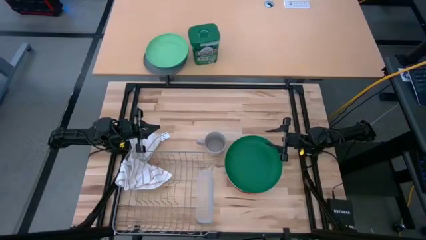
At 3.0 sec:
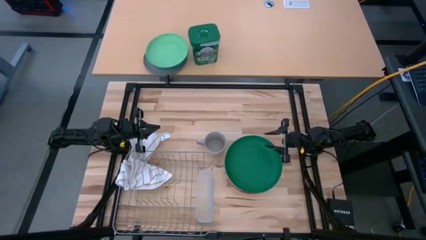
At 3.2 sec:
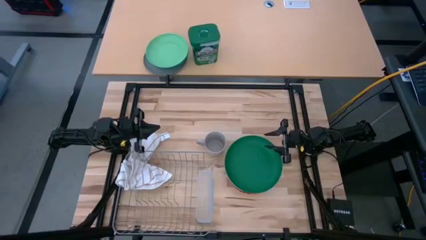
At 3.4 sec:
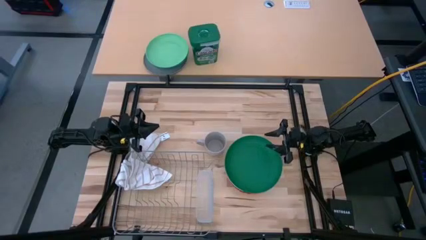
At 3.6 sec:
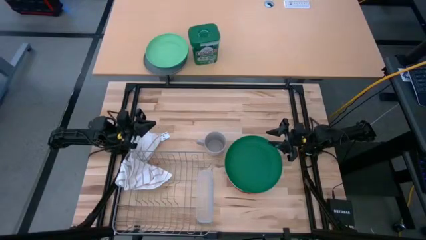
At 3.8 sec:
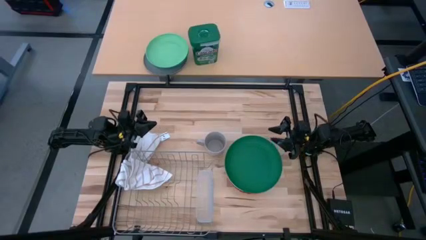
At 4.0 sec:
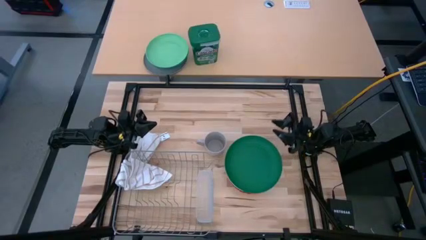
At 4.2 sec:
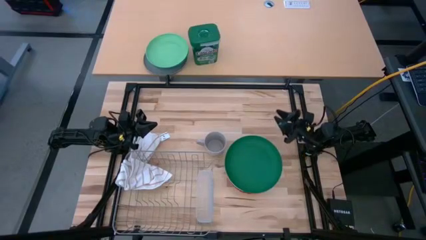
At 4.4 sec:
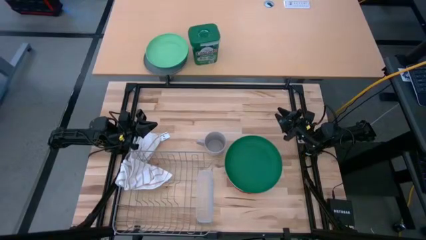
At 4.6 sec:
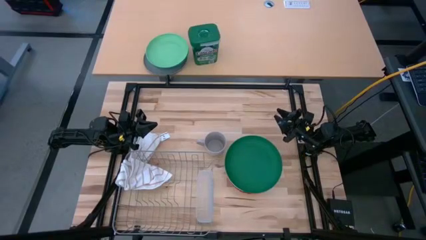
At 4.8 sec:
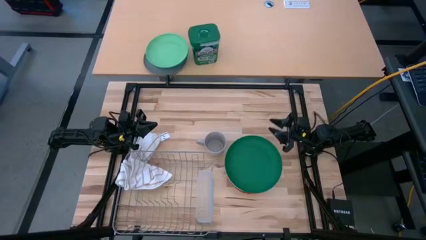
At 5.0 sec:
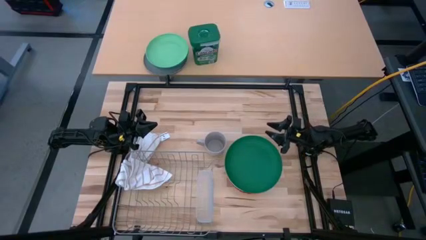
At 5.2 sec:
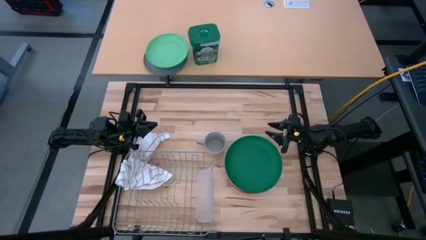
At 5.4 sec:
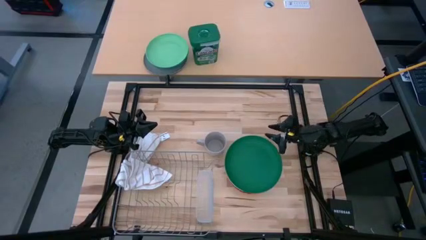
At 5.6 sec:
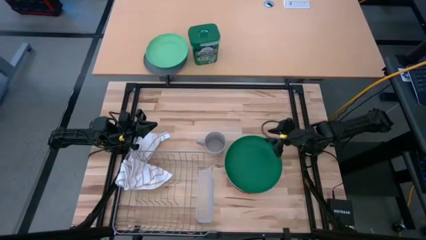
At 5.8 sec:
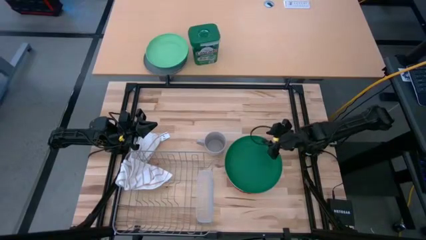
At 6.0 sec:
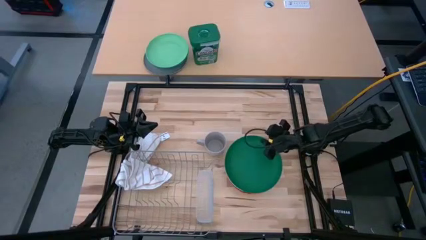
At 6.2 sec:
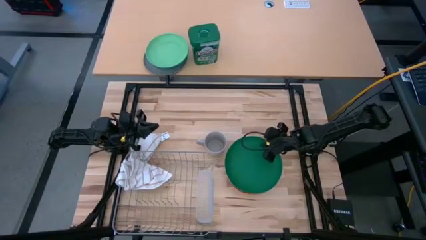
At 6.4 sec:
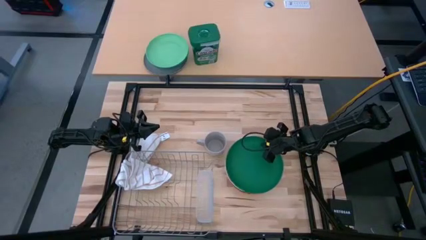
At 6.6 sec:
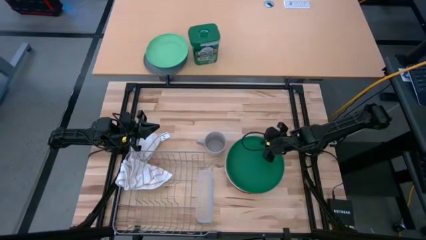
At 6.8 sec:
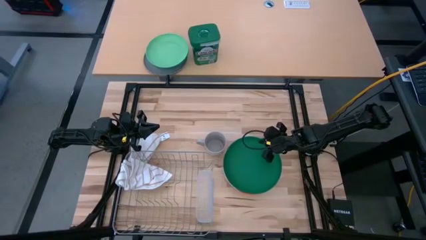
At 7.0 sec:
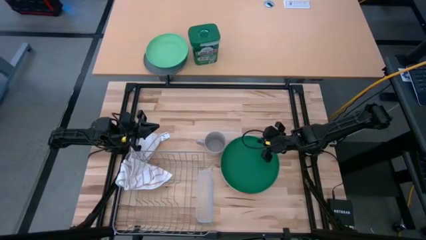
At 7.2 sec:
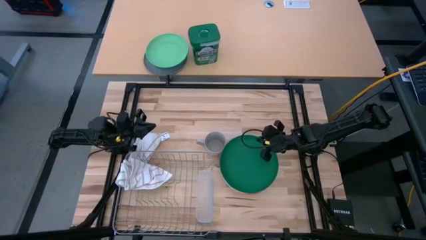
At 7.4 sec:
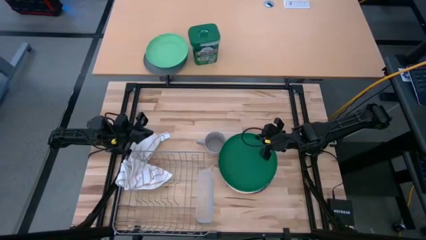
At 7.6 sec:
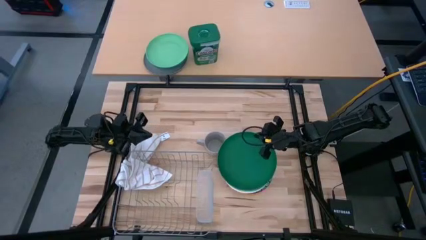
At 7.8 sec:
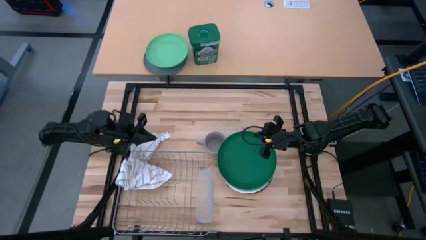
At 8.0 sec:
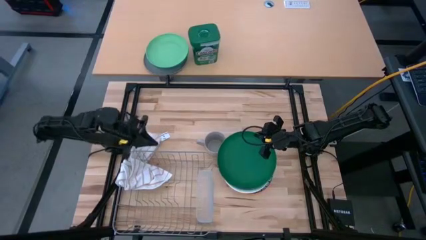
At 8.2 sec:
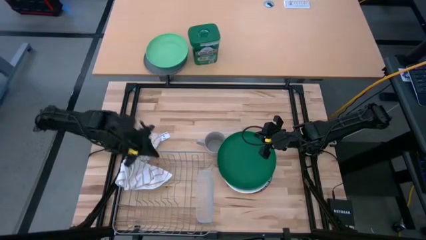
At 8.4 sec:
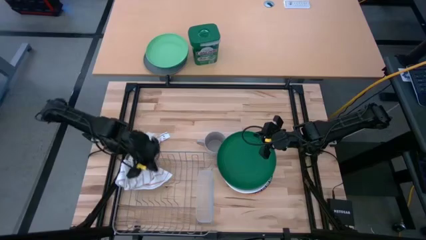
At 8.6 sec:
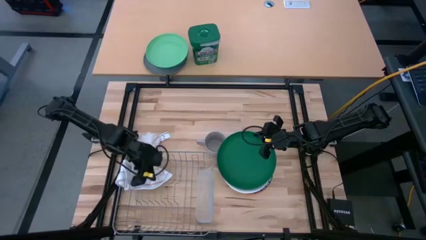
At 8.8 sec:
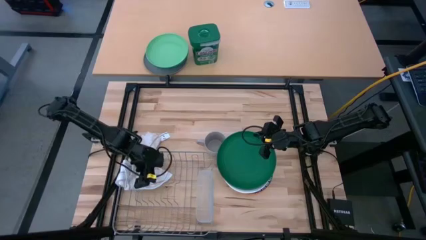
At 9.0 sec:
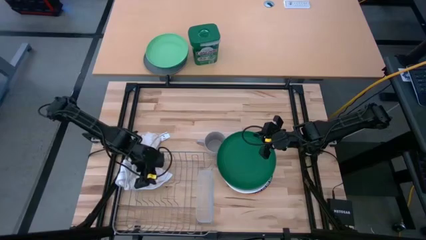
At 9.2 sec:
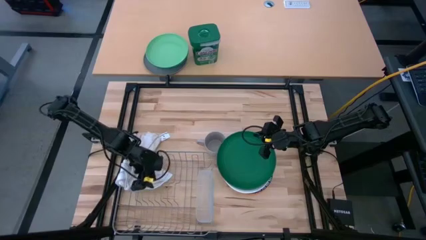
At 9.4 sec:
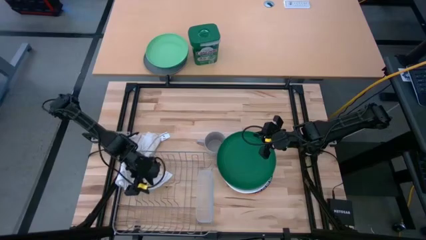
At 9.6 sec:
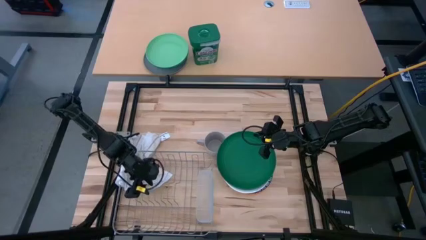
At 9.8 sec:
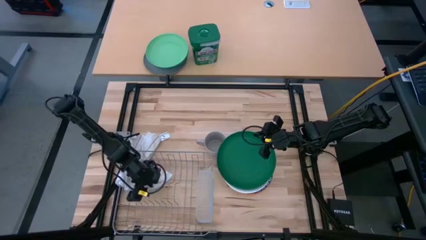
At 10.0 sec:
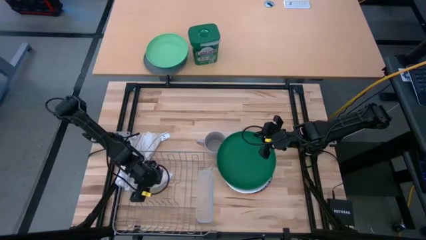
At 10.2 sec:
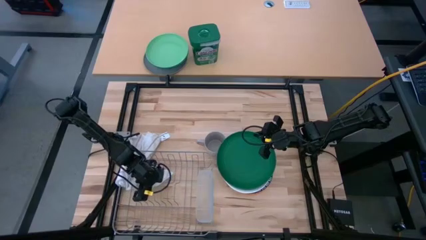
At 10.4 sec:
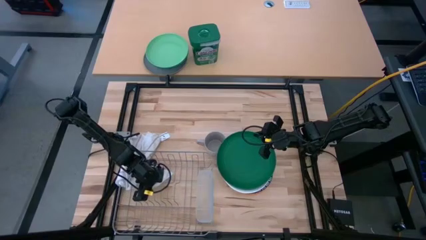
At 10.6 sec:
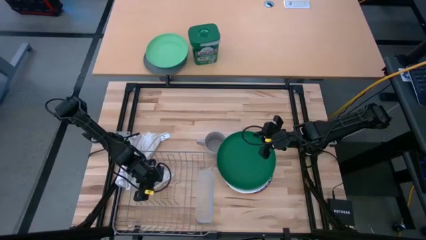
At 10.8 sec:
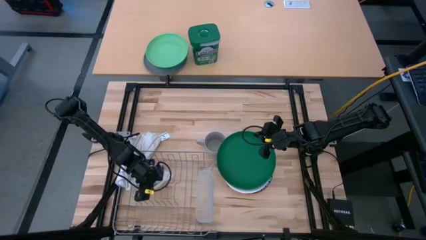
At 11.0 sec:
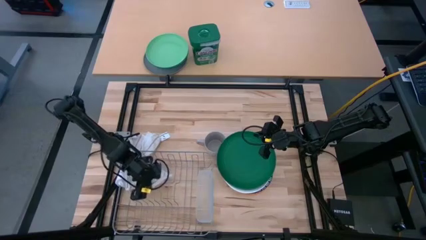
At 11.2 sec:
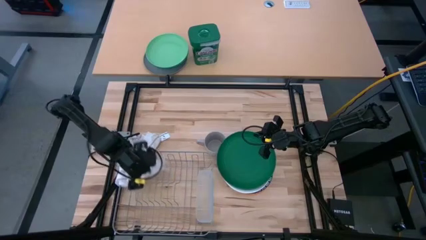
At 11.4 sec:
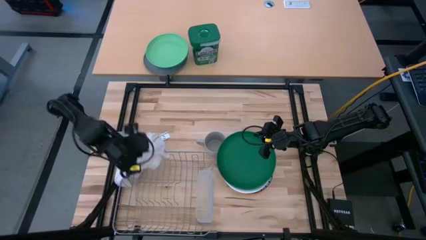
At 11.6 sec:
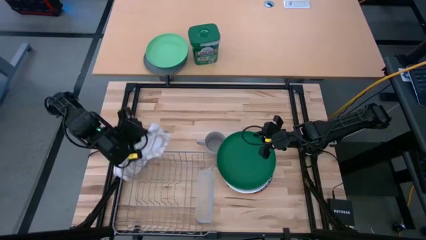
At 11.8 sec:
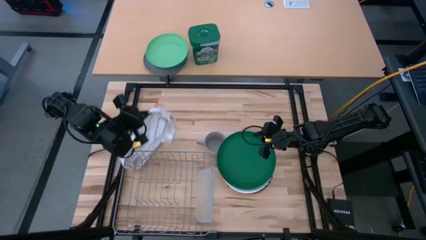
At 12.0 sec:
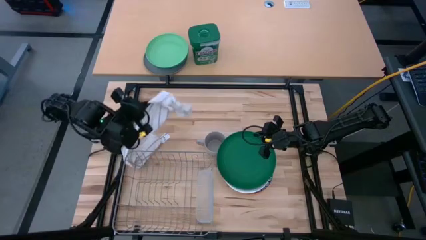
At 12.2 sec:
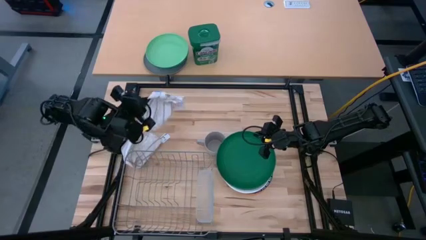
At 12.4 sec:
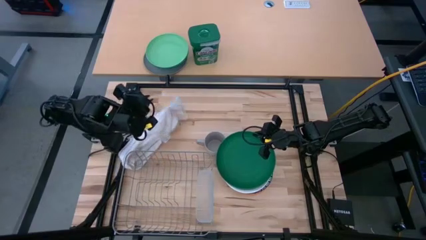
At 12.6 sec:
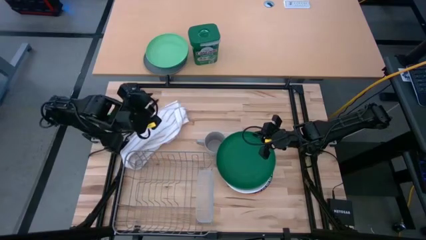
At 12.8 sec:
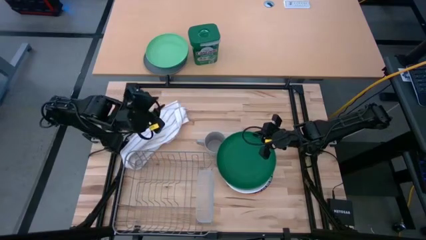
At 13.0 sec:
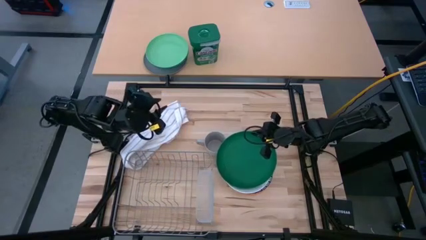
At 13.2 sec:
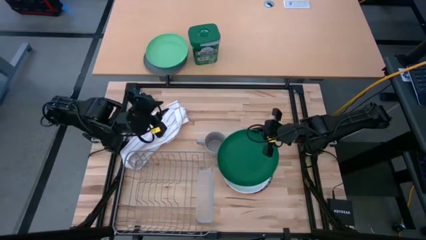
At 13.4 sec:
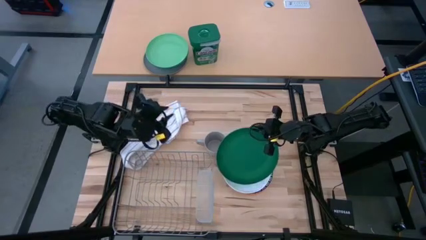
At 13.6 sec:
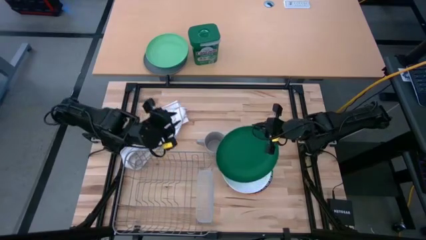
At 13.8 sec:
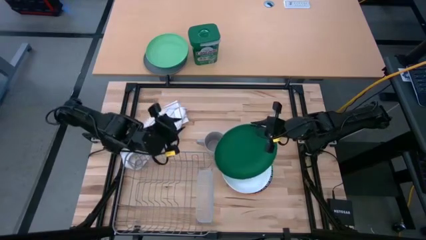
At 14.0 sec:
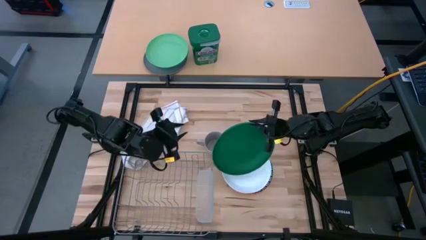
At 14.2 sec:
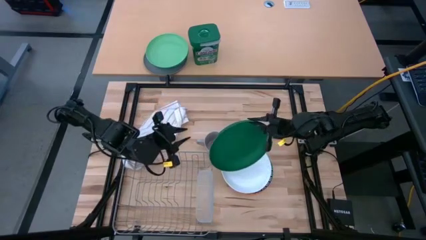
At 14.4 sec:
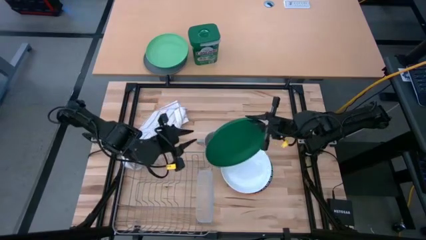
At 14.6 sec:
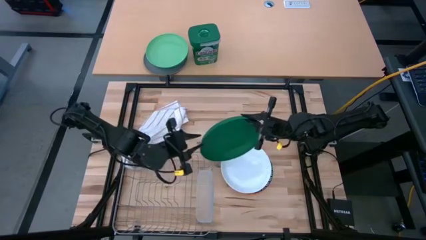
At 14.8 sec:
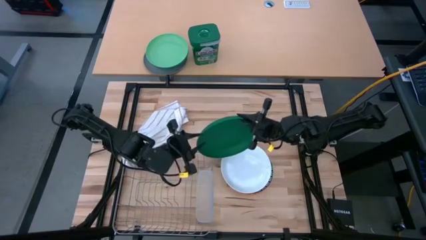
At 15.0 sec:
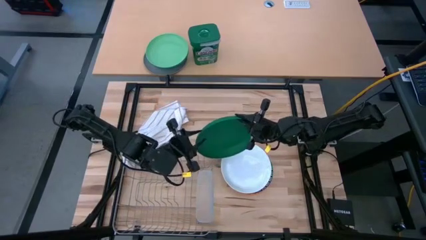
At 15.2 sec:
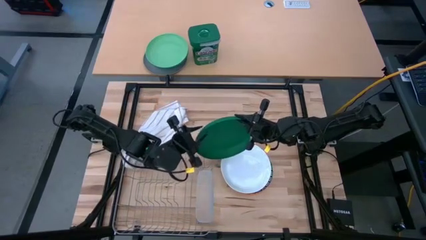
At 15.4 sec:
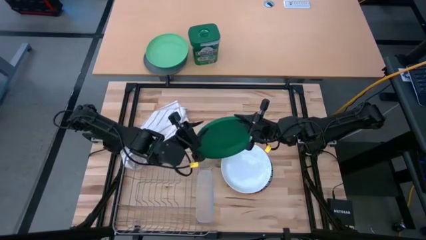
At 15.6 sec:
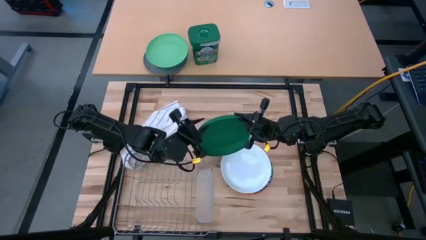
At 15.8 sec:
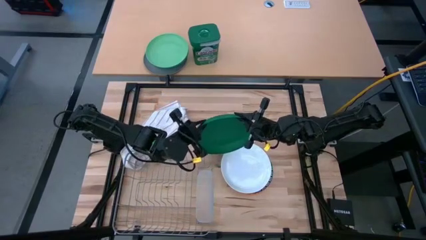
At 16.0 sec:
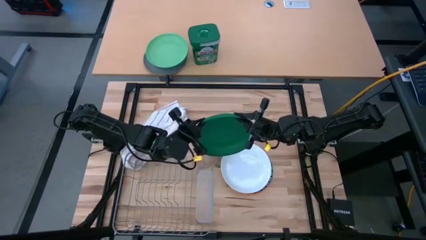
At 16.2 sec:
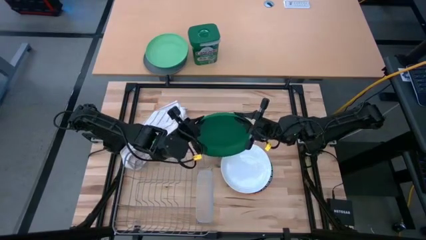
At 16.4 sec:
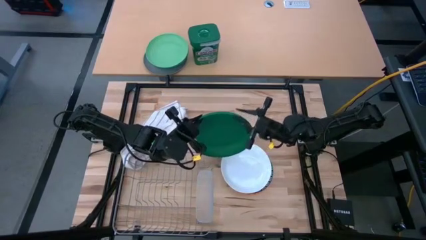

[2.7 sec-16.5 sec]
Task: Sort dishes
Put the green plate into the dish rack
